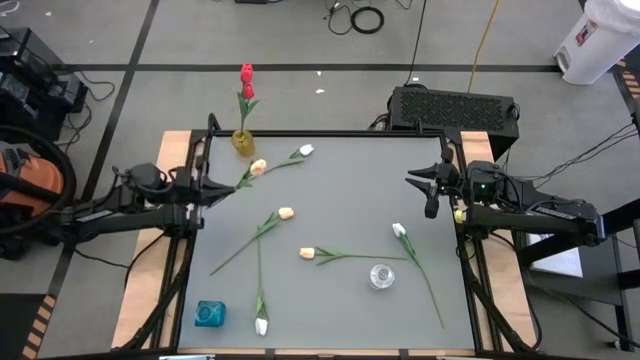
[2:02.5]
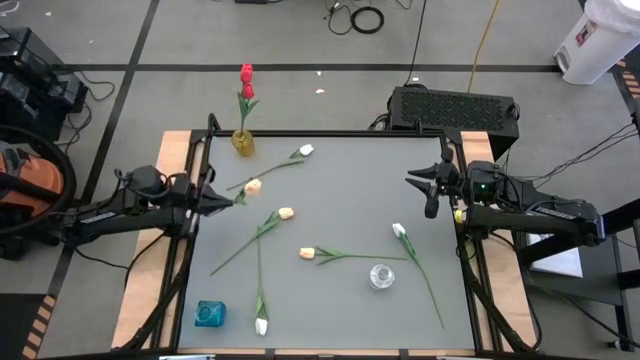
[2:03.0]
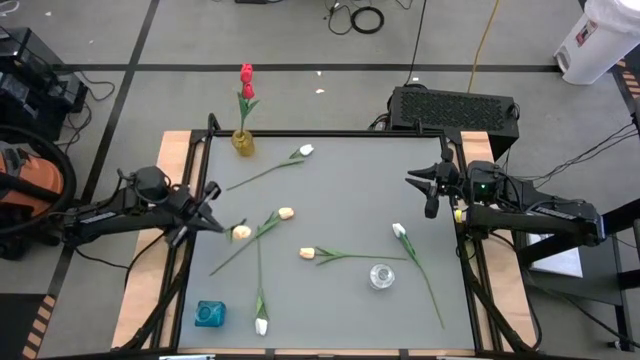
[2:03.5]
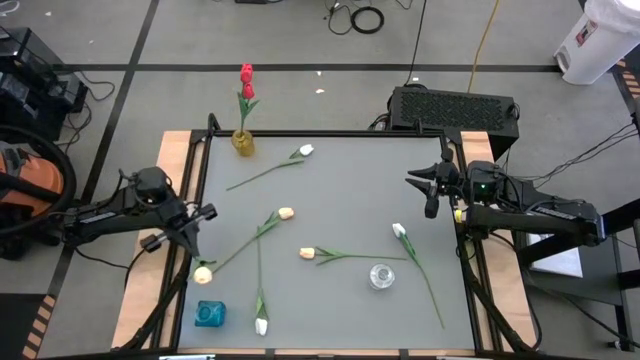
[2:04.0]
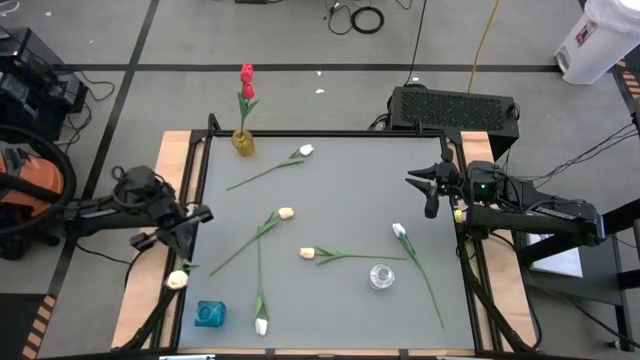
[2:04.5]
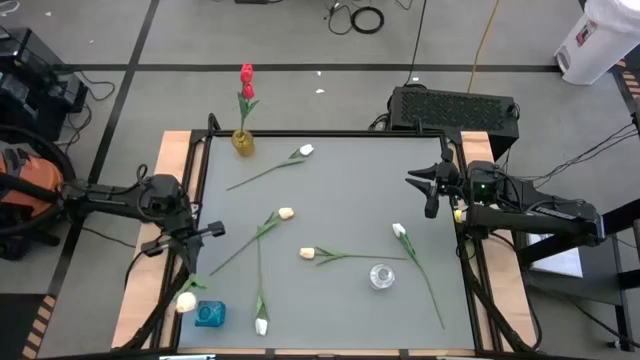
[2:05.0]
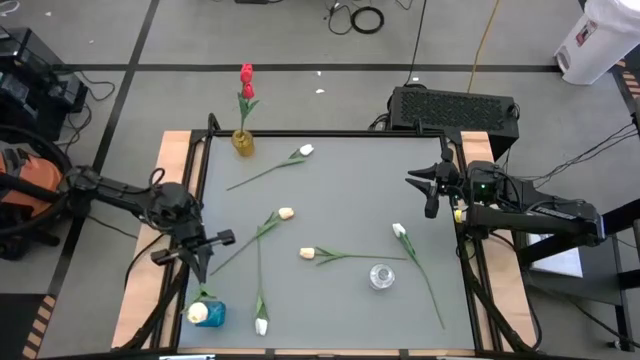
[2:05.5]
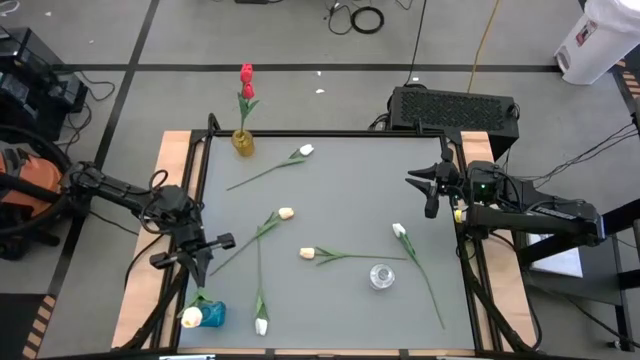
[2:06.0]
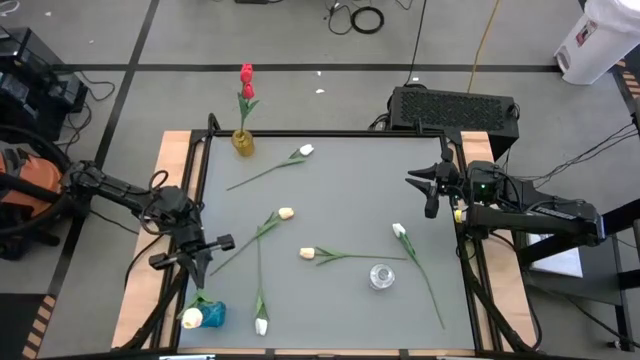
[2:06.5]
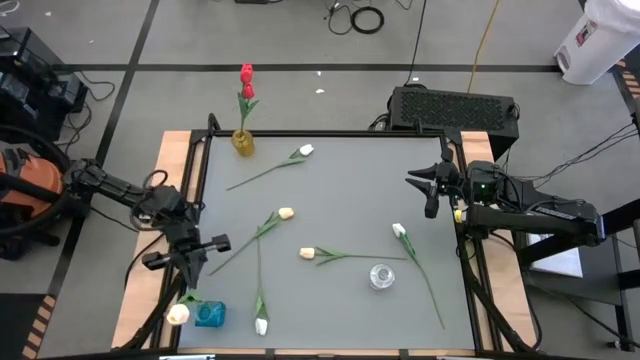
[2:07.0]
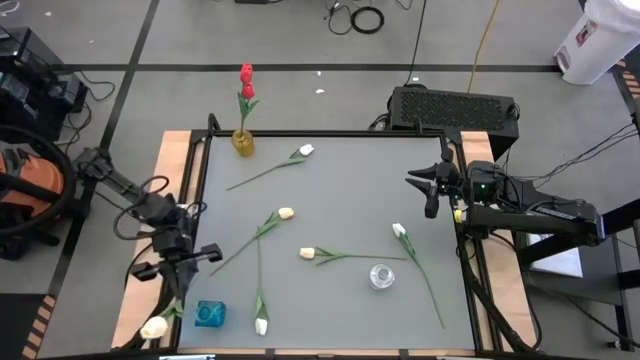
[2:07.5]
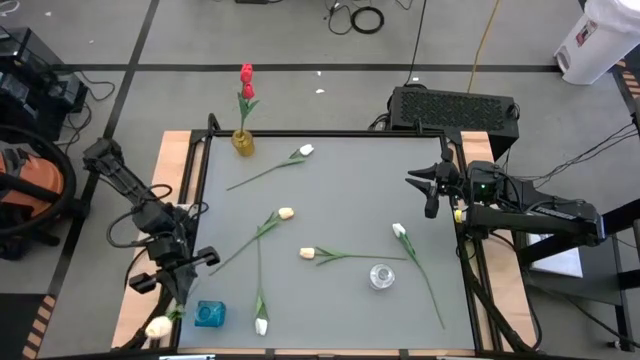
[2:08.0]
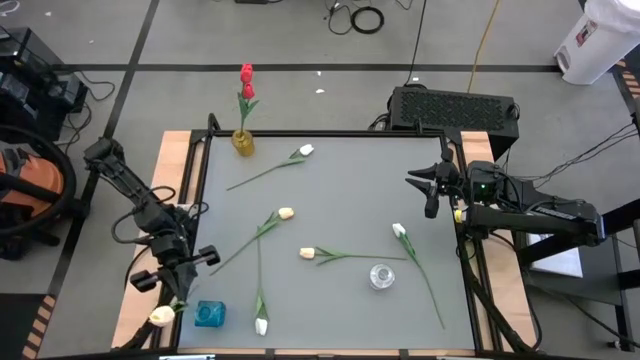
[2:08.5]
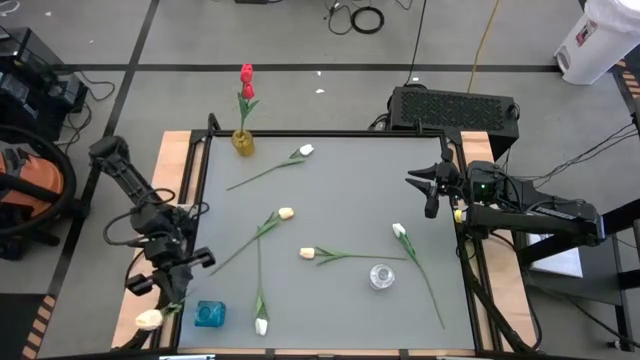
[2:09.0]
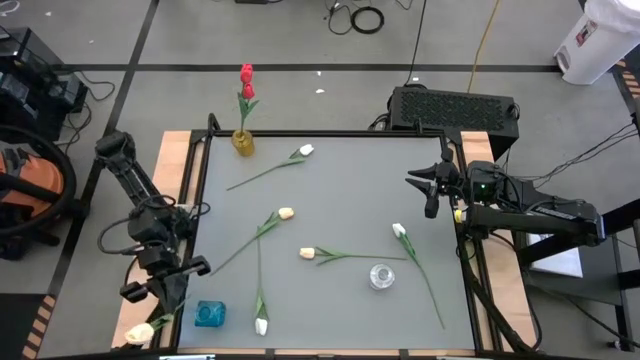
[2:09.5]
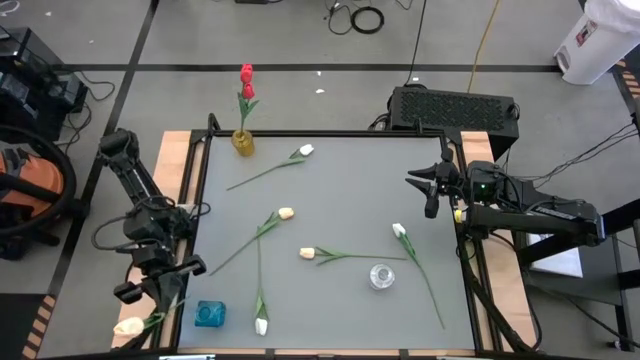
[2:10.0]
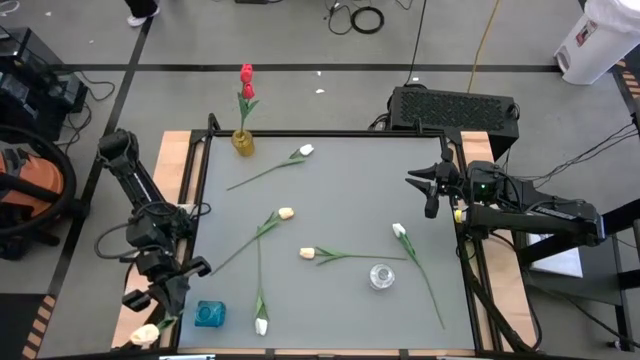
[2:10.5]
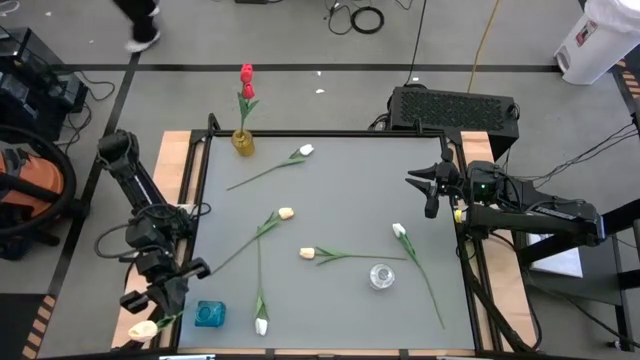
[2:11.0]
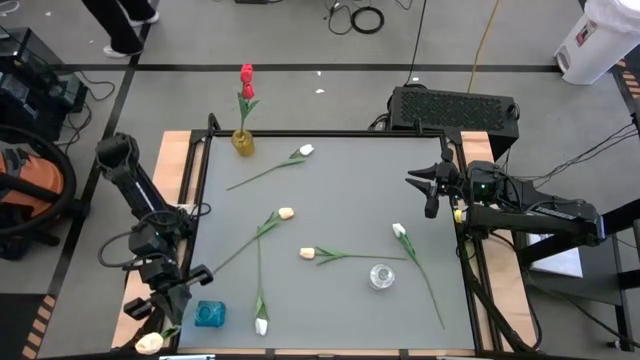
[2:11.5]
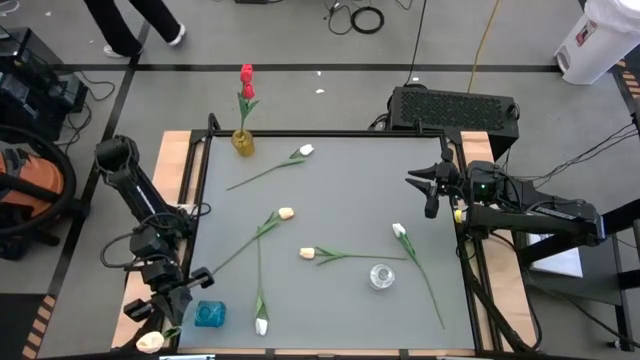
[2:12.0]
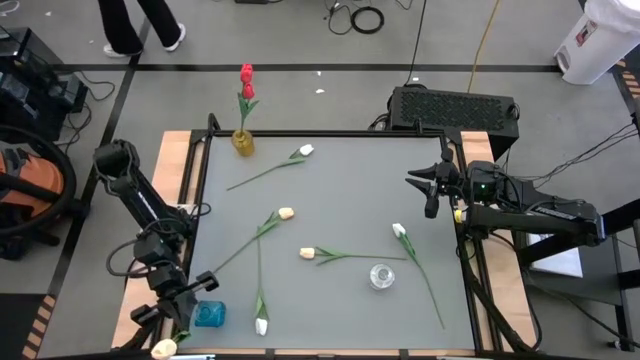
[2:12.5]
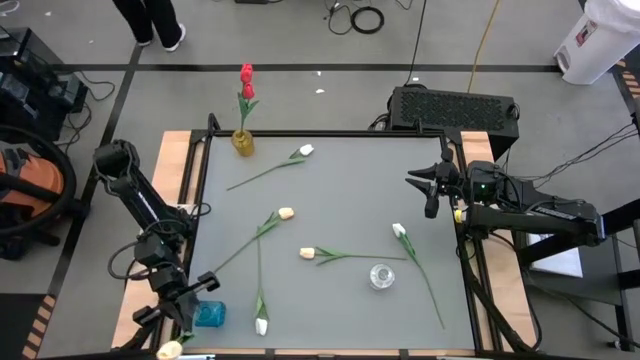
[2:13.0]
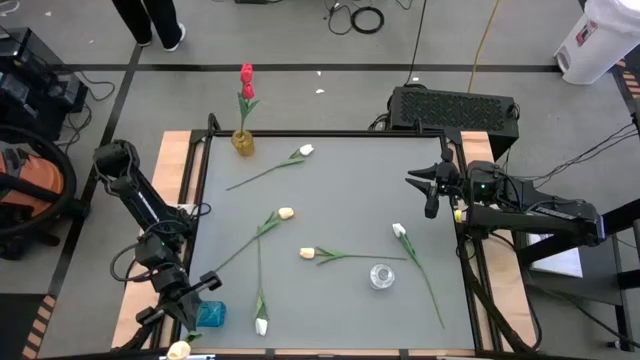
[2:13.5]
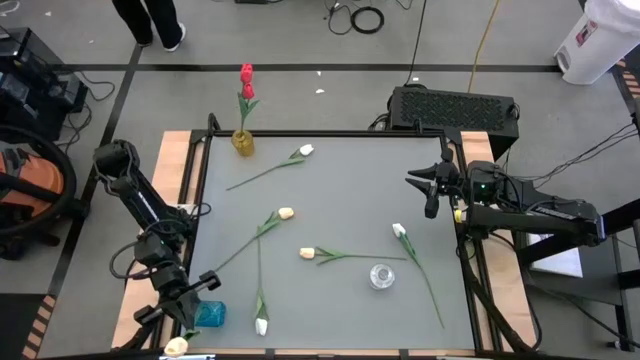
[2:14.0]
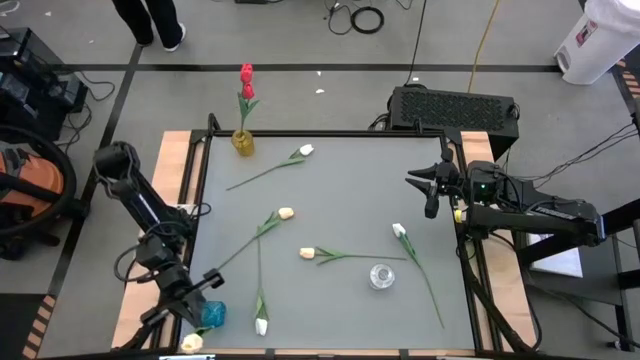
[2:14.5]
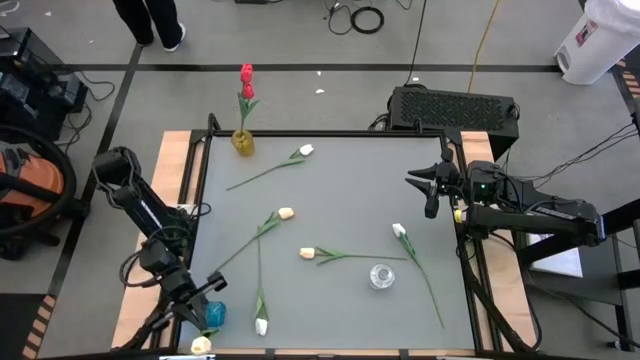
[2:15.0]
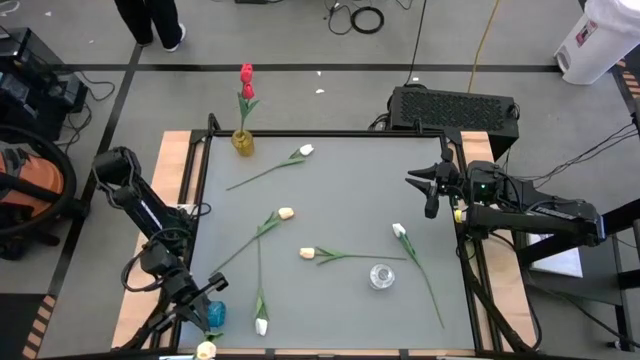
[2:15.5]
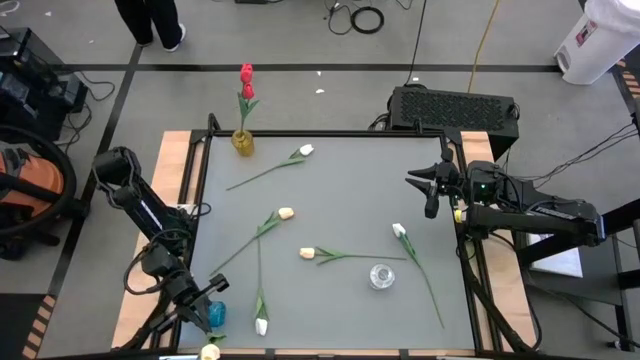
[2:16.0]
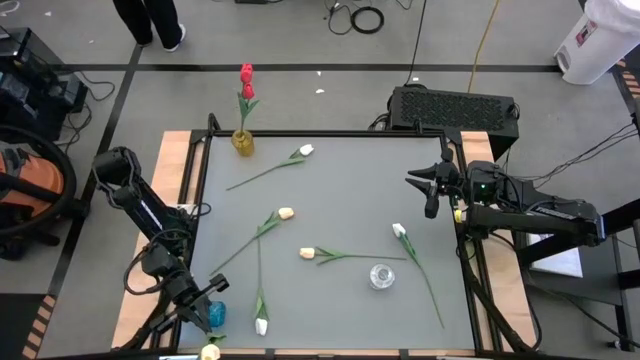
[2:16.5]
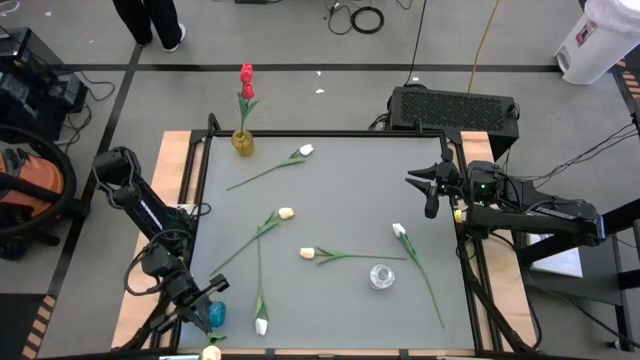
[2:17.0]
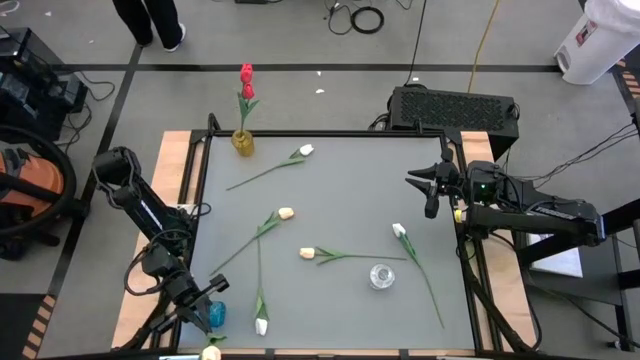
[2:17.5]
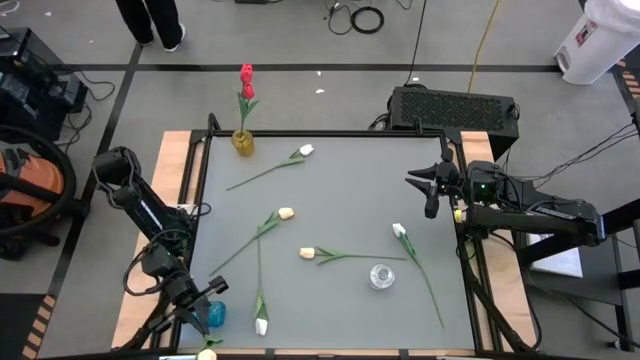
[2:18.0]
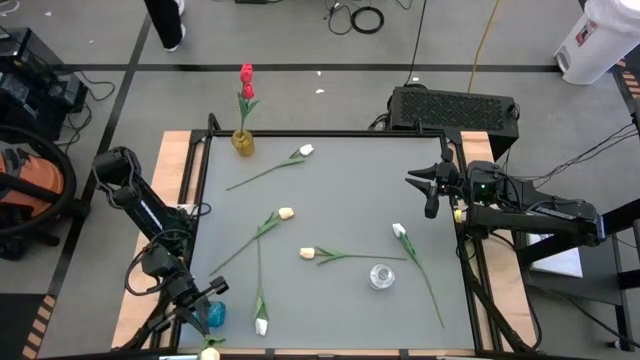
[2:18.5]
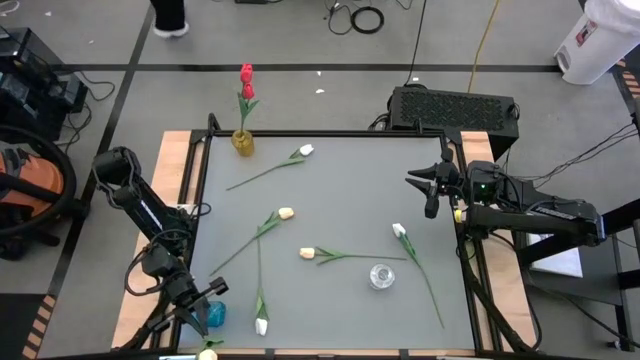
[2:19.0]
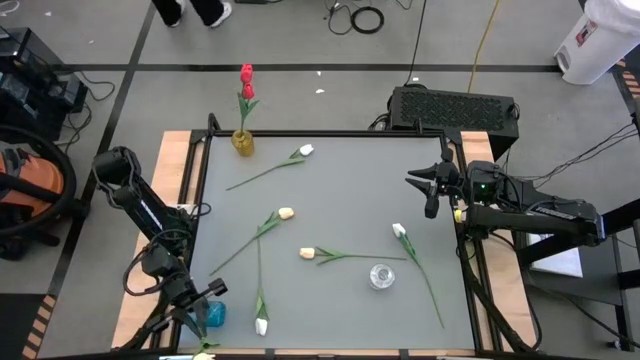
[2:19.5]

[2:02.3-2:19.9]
Task: Sort flowers into vase by color
Put the top yellow tulip into the blue vase
